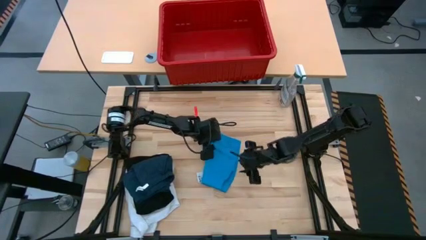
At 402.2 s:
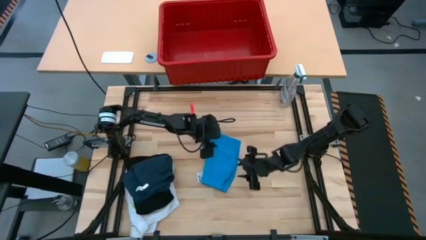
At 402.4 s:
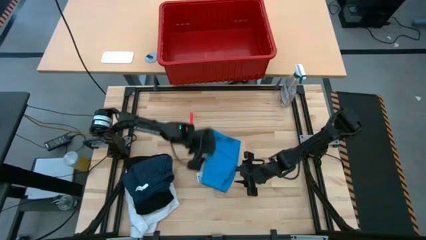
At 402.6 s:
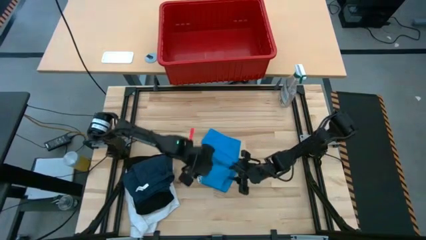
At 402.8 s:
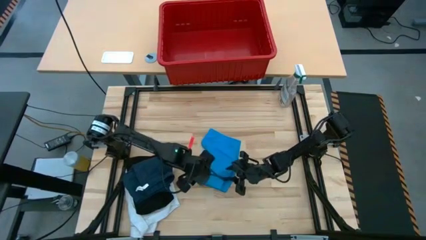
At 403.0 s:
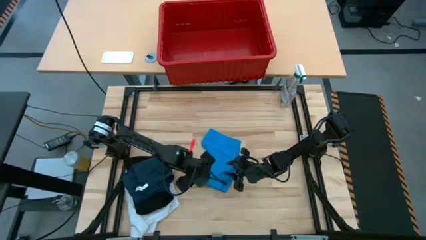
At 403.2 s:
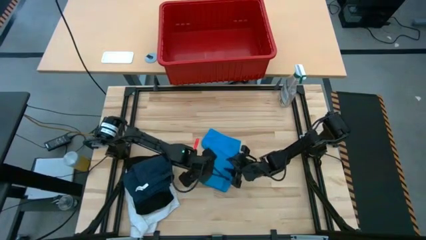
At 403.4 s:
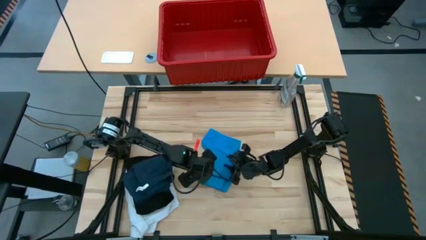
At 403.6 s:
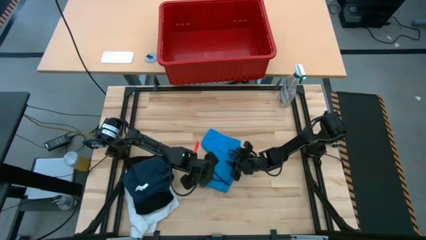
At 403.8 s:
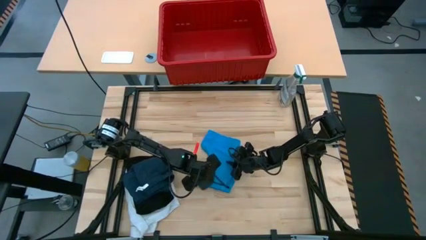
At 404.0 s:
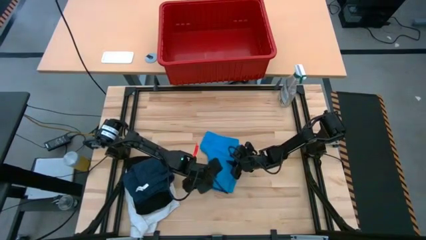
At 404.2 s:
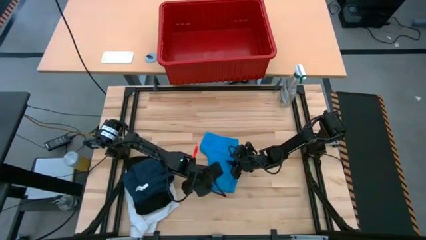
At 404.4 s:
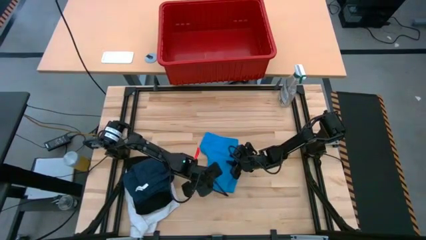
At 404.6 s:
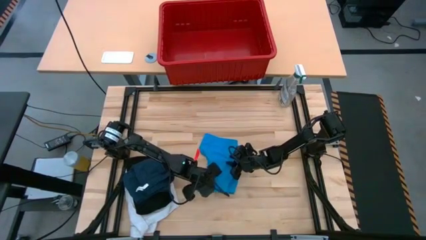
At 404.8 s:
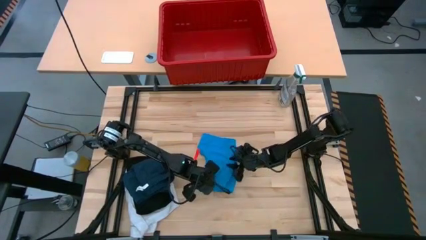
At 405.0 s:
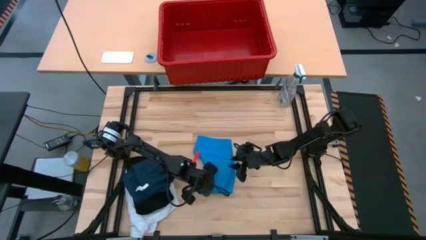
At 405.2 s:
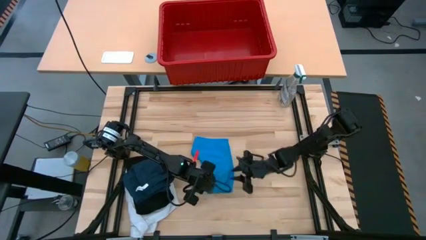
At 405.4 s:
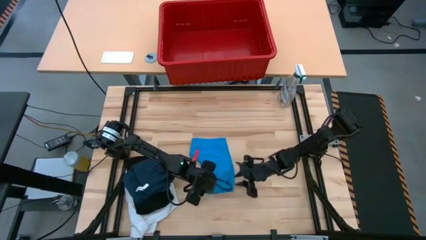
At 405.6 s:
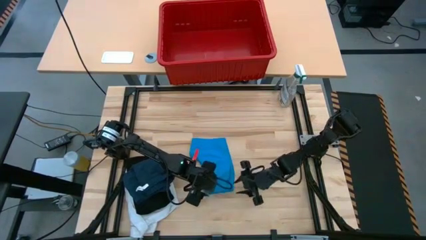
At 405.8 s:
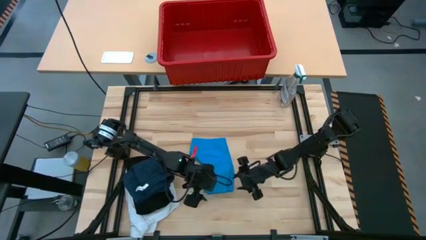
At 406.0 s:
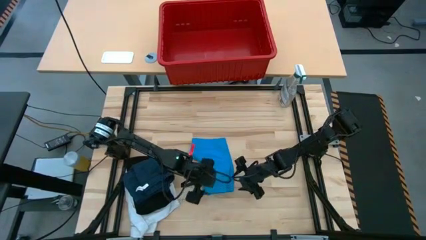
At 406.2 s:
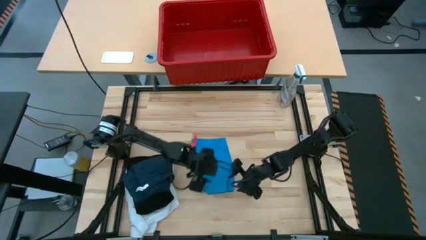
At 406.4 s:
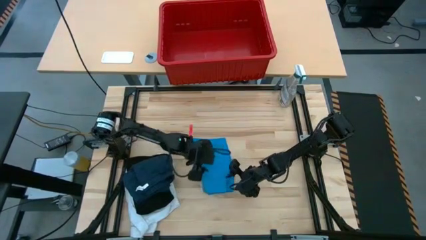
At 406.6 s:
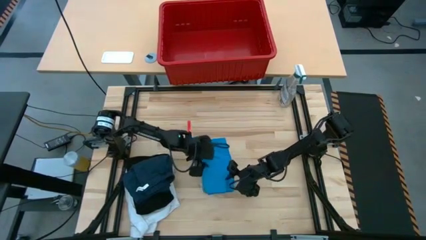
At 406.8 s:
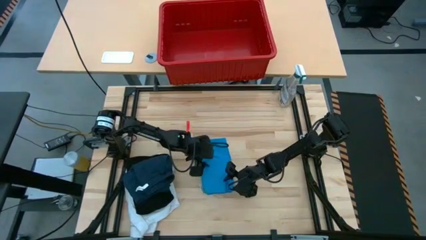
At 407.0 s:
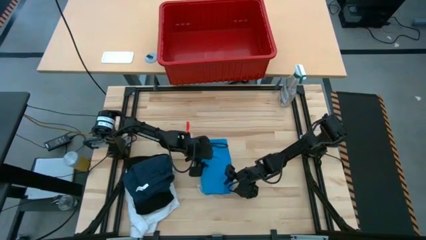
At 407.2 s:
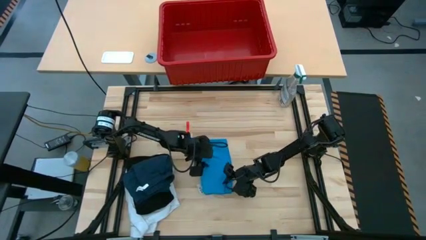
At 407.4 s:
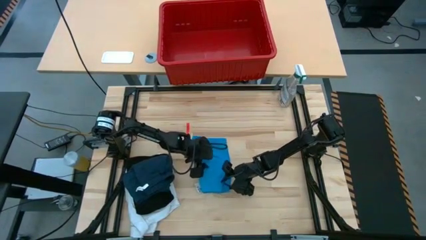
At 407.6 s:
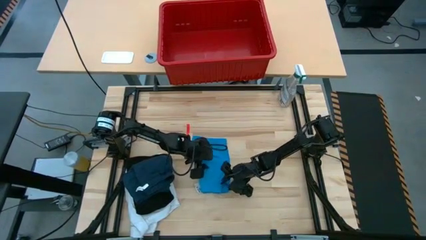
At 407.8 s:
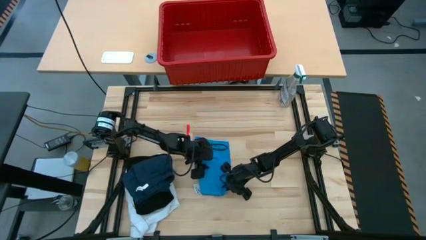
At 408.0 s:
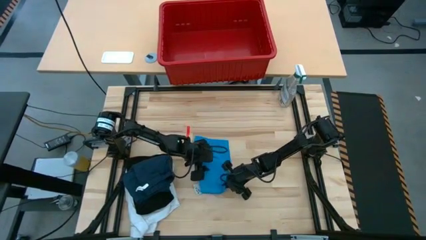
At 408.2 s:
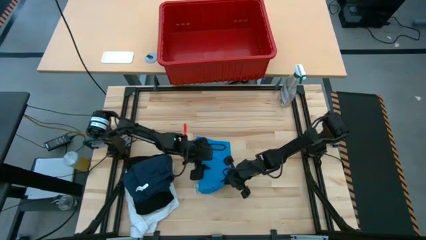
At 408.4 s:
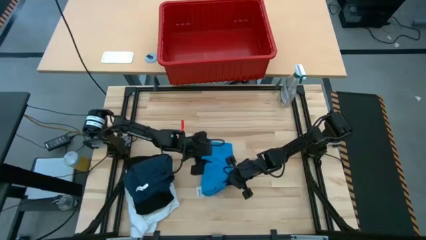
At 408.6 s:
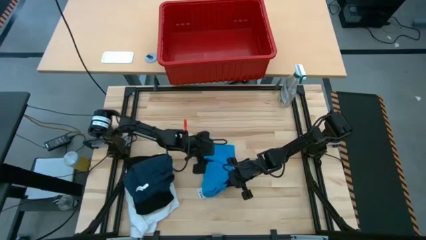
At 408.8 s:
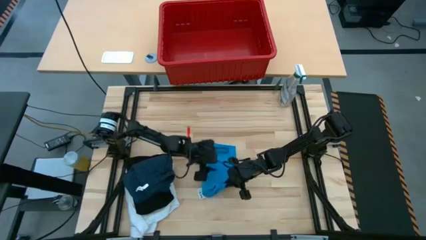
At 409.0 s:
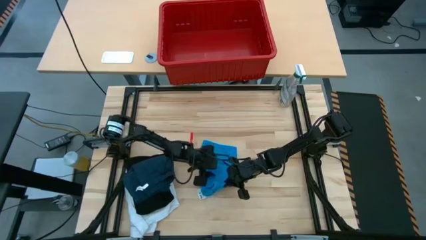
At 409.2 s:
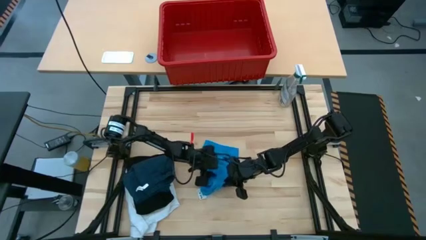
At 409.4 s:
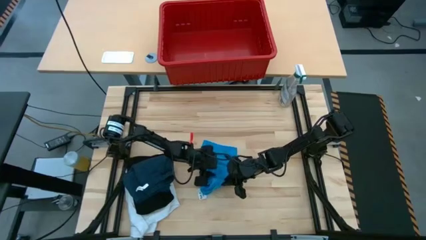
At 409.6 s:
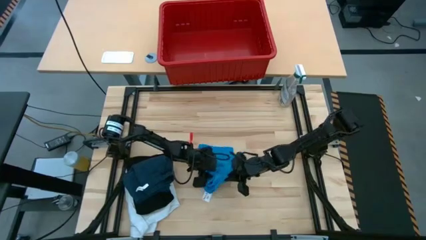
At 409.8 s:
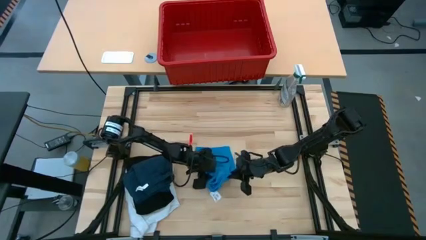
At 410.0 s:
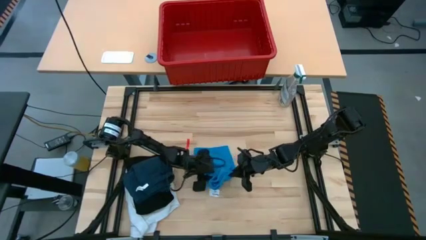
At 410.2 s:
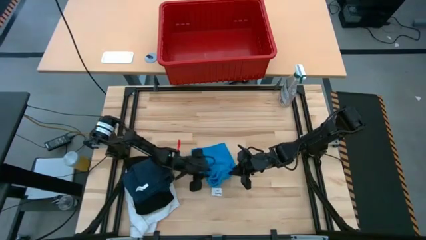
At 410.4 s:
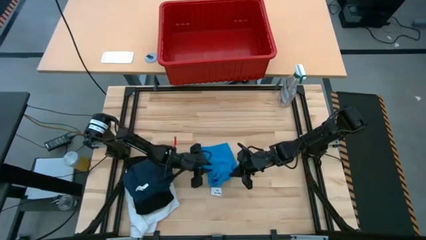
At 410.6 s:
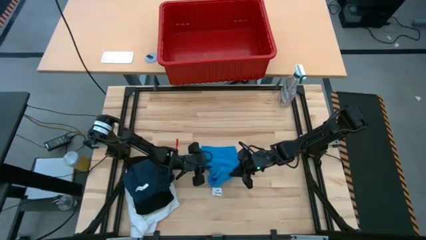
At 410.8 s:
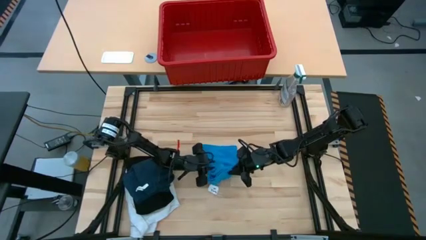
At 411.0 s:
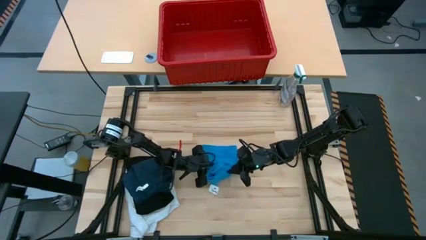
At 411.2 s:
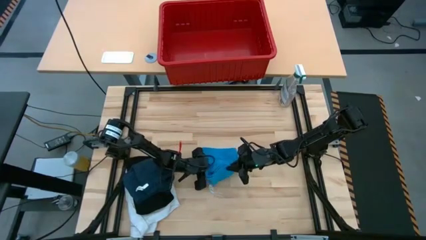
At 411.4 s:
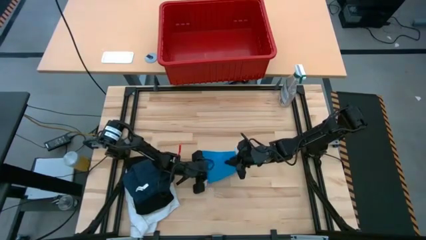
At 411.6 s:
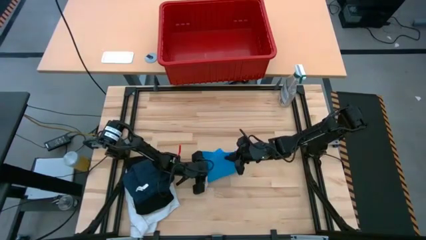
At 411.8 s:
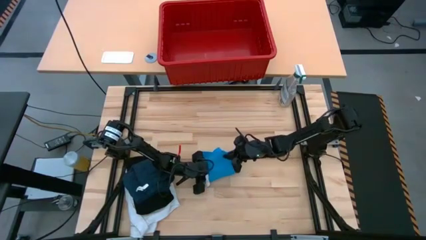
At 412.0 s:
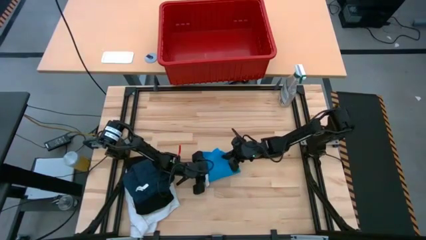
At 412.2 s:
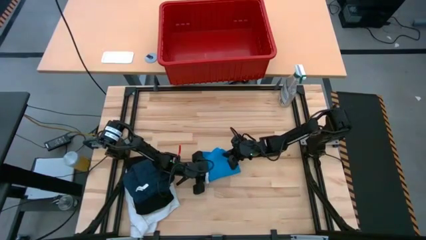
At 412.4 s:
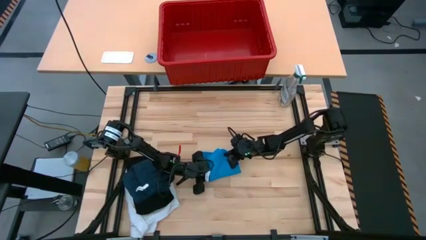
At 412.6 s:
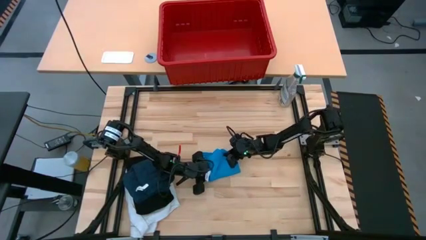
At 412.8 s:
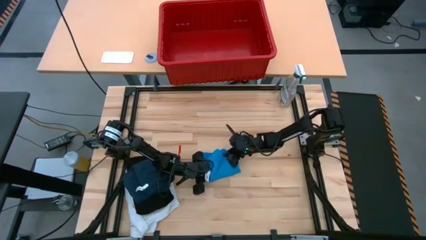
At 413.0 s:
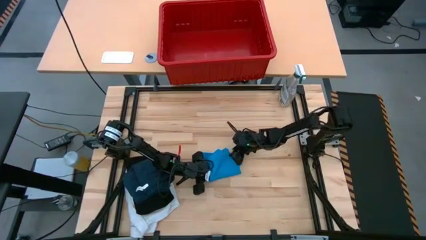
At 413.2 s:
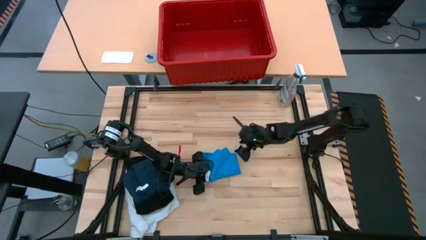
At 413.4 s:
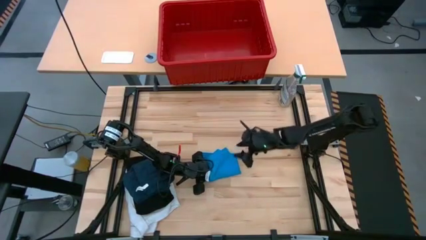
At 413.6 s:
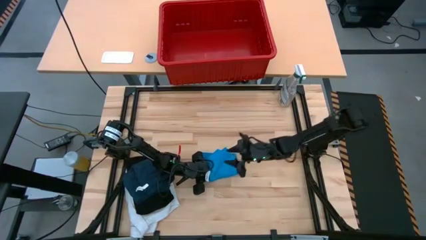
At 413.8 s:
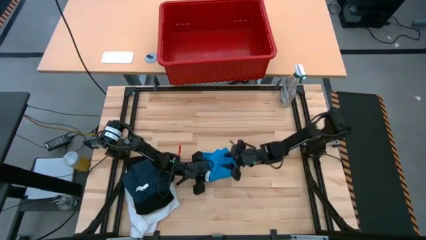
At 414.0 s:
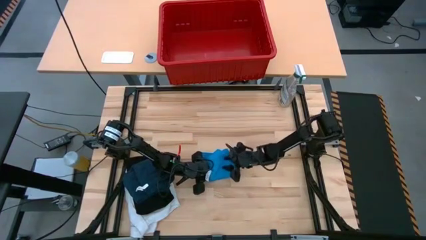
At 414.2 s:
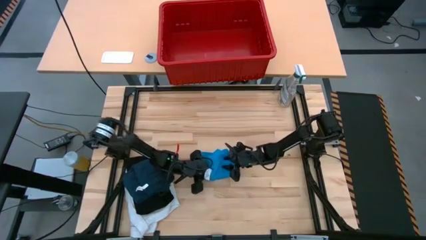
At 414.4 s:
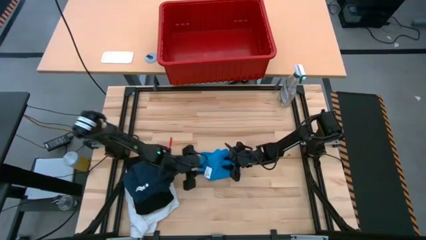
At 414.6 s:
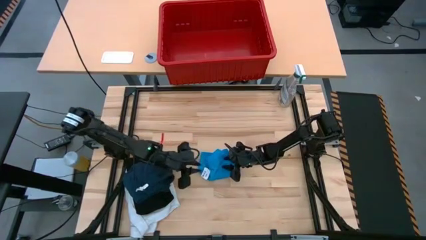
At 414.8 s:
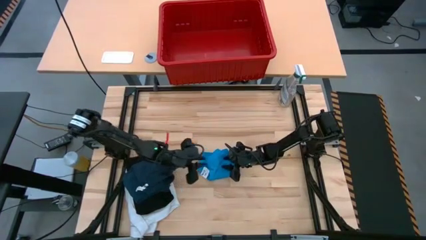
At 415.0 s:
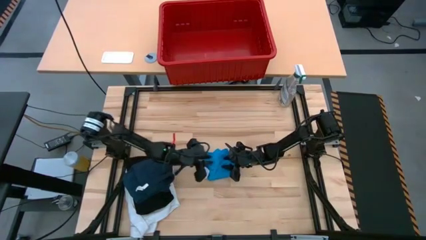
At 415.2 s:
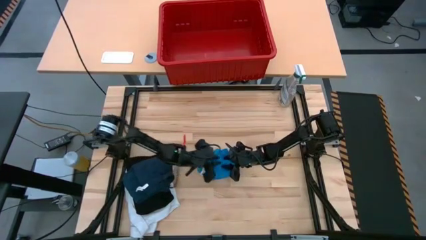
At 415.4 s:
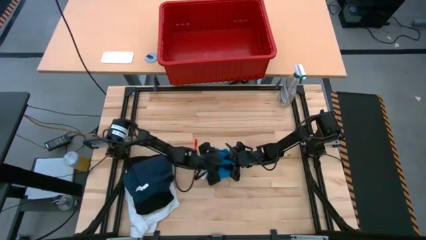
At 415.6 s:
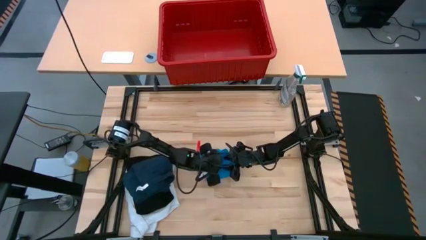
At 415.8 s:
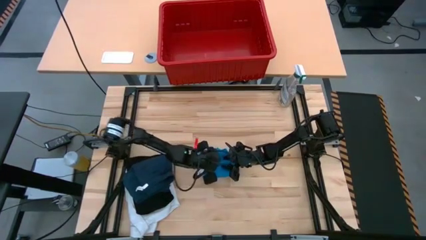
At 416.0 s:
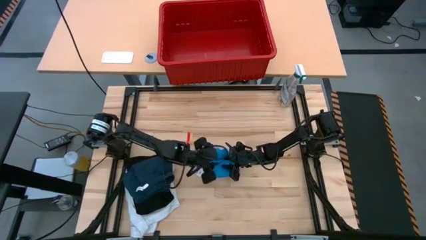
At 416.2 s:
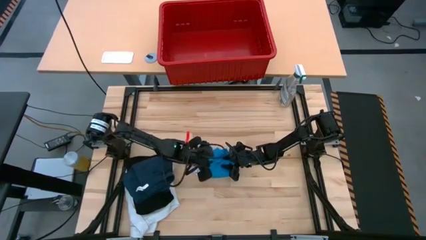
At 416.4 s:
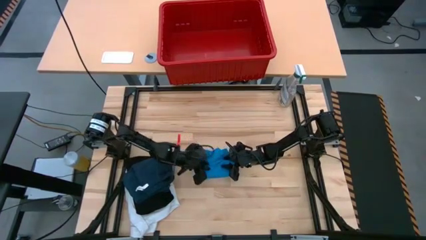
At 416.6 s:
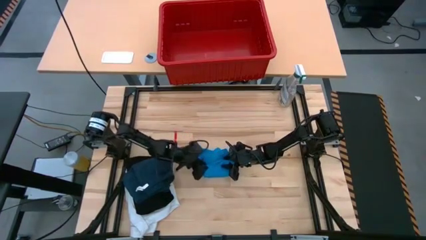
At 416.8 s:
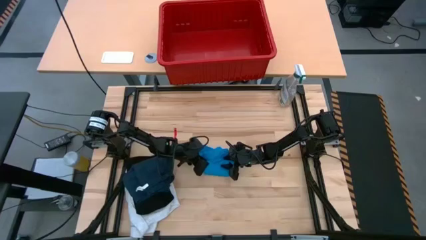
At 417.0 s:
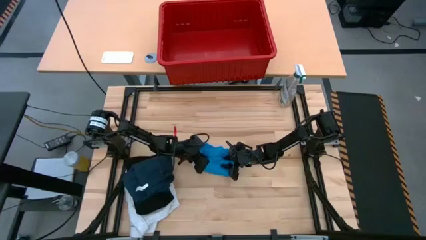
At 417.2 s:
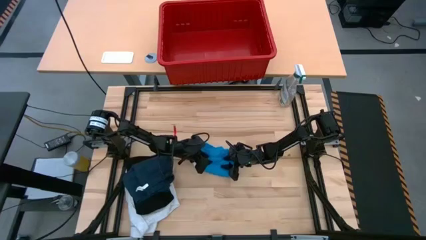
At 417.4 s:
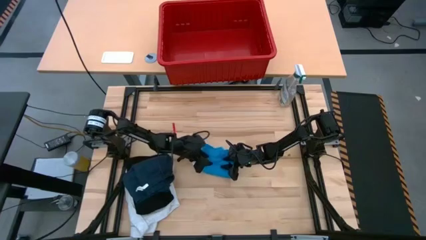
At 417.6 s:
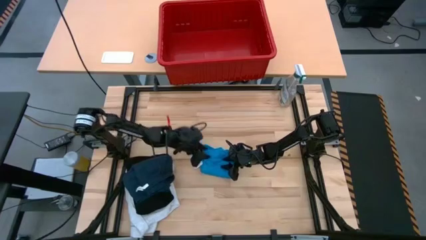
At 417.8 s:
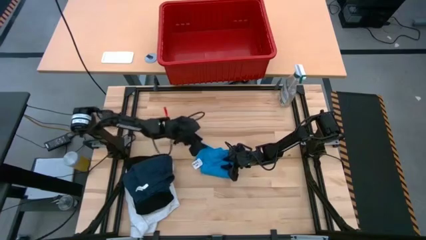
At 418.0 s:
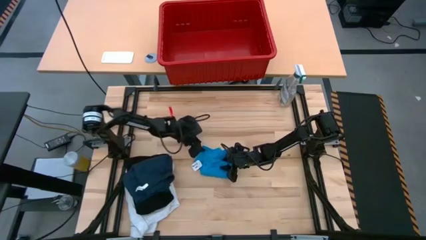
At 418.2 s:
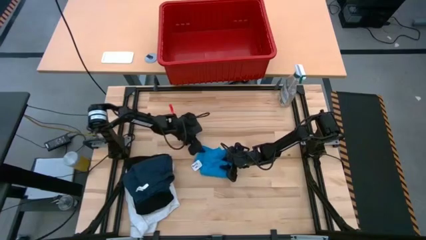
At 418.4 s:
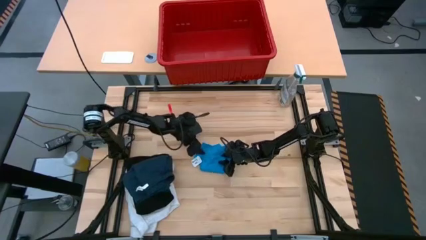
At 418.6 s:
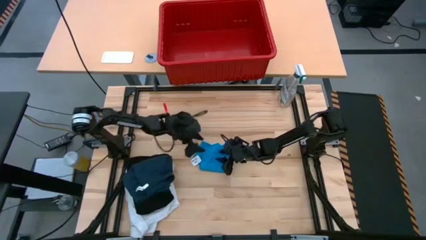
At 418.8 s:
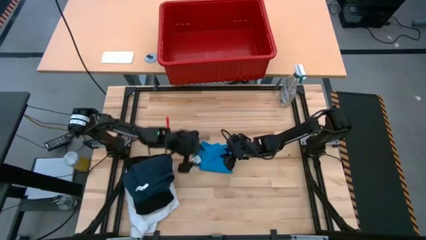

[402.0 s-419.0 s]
Task: Fold Laundry from Bin
Fold the blue shorts
